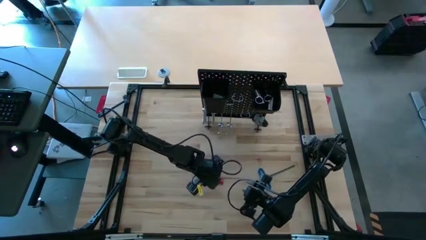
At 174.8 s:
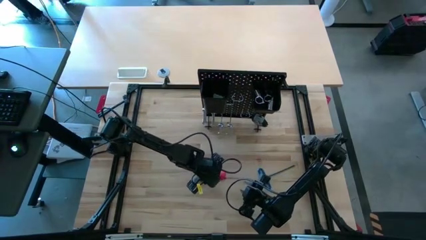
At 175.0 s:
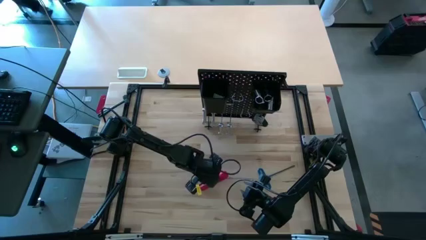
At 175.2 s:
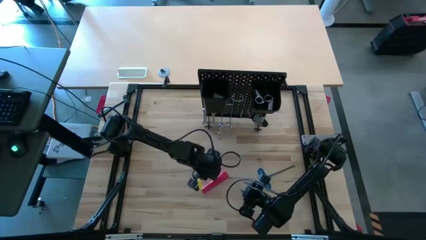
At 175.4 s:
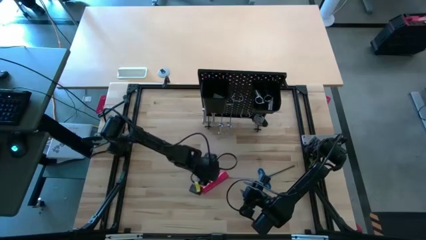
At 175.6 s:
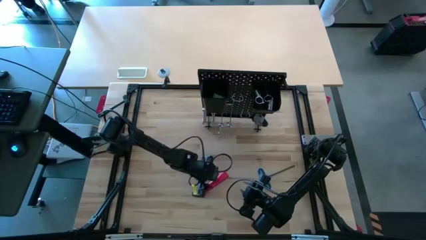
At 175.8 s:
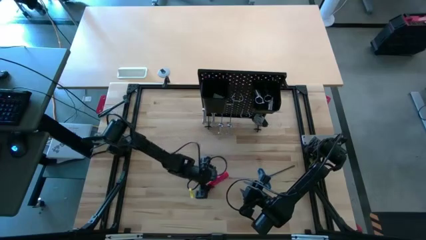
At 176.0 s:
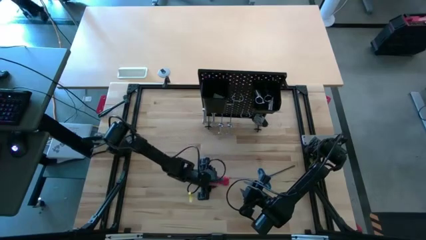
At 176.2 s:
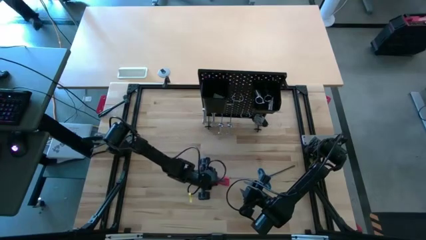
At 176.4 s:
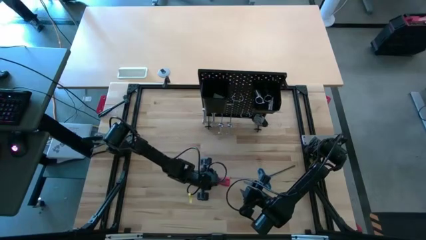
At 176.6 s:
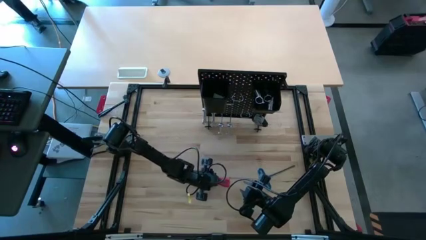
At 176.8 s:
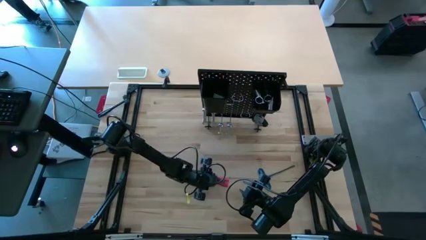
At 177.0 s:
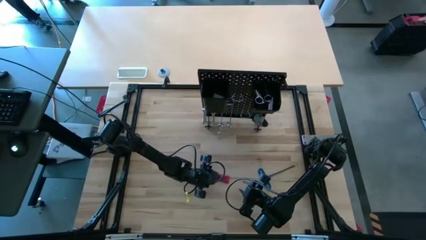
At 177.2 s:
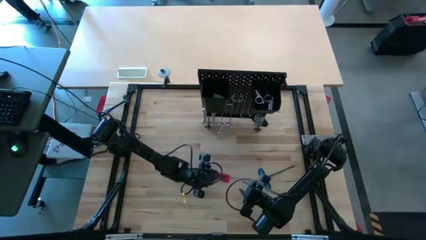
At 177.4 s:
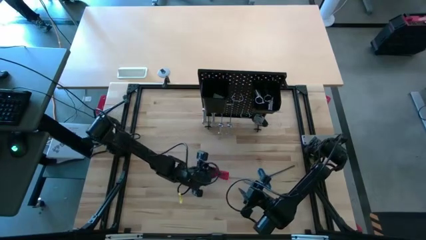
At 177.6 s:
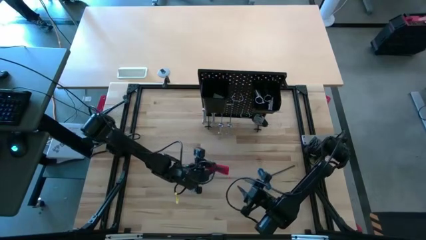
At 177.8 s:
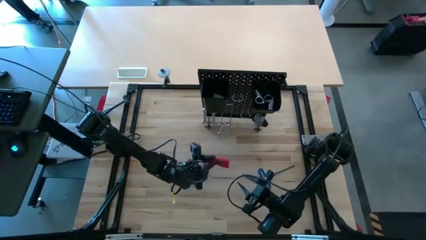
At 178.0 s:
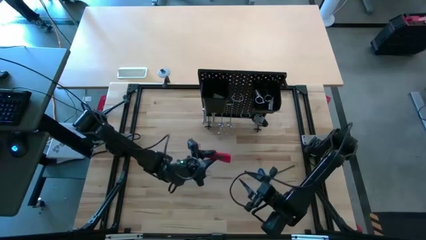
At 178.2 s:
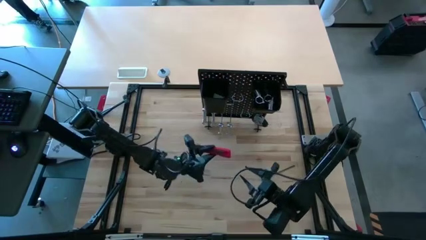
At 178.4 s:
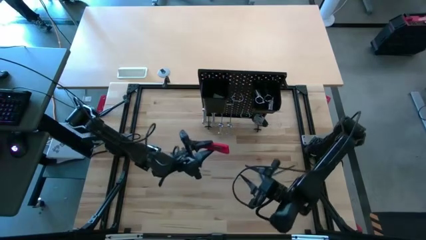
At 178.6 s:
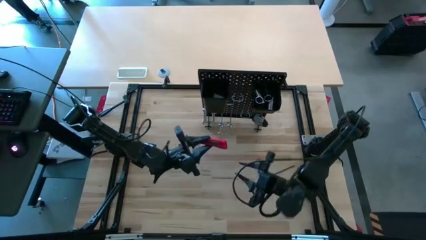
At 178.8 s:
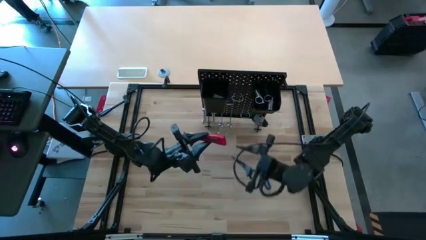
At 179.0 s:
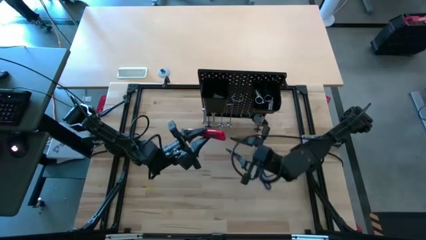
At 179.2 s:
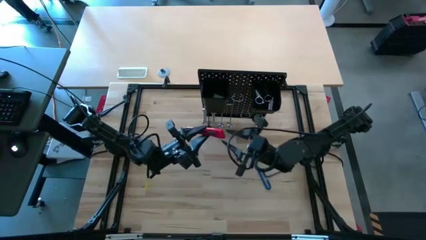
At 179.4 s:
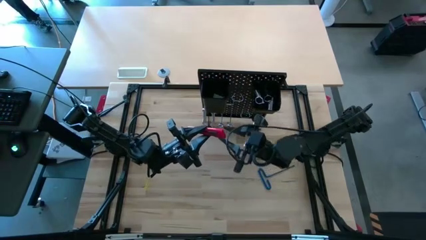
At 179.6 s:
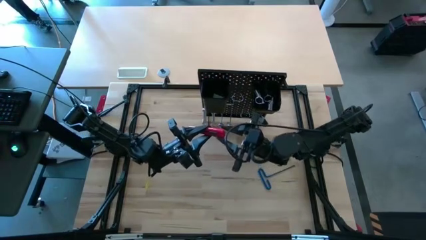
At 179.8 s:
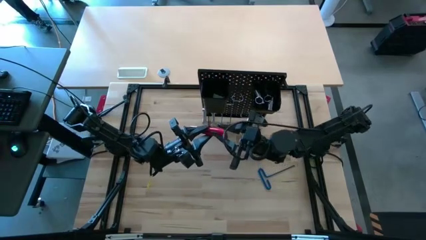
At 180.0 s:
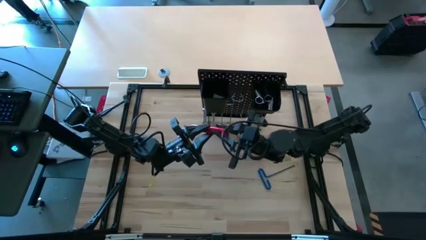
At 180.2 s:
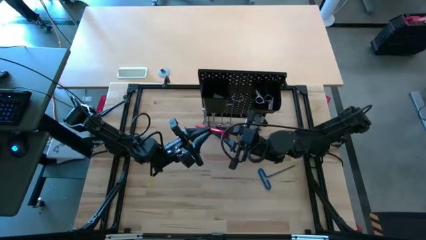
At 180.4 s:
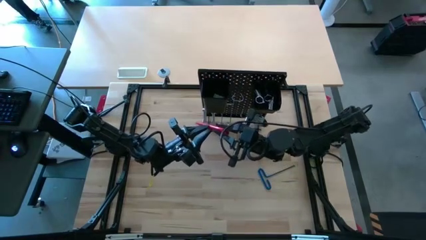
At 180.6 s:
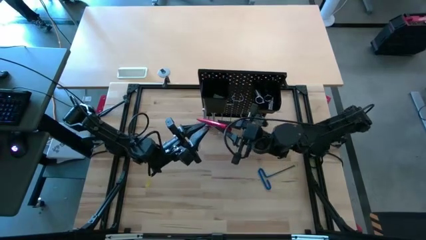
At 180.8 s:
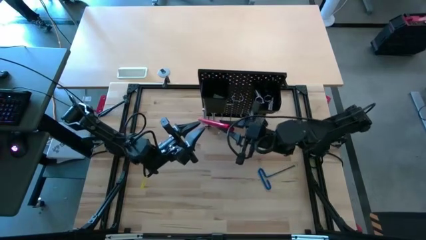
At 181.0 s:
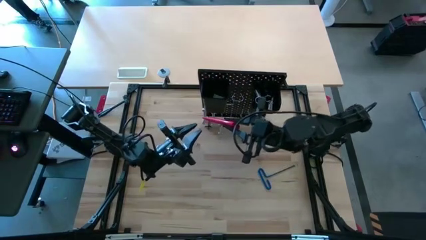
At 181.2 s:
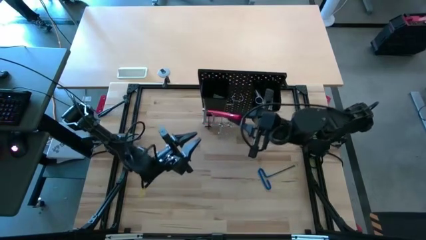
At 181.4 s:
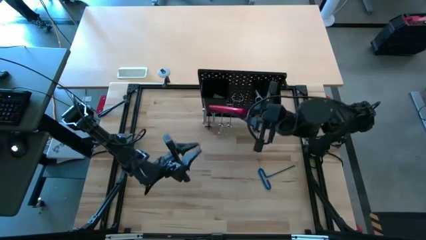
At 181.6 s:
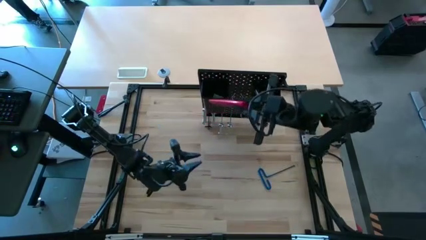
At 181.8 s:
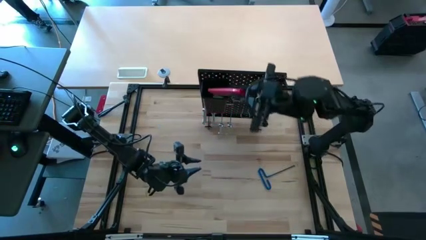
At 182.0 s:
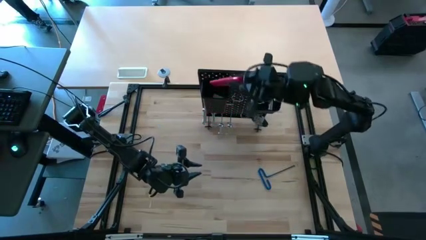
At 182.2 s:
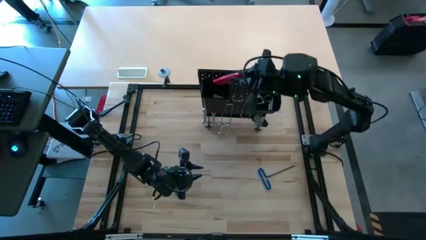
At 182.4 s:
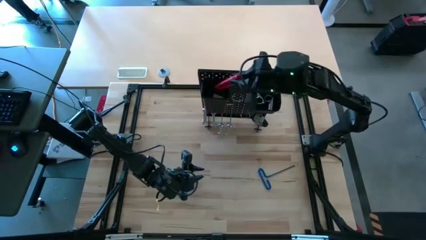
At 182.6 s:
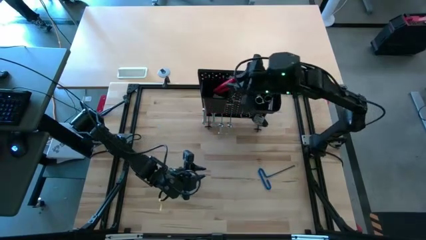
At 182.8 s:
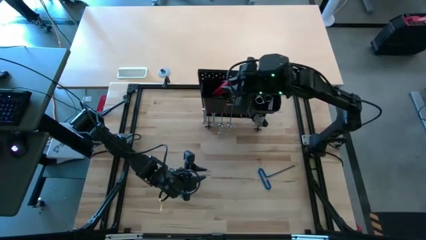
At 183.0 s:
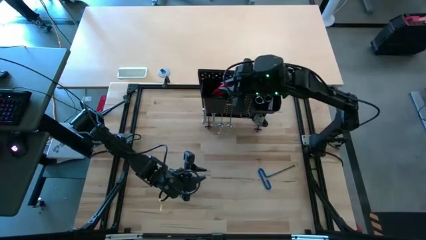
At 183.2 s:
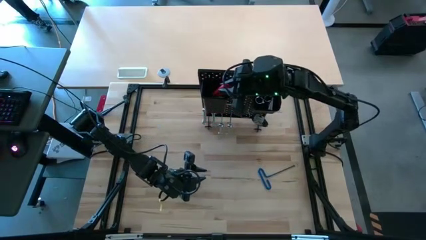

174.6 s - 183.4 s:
Task: Hang tools onto peg board
Put the cutter into the peg board

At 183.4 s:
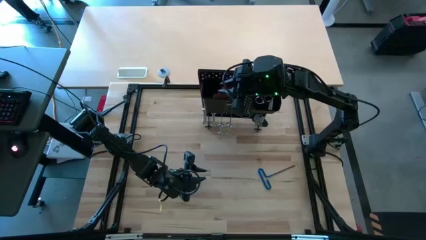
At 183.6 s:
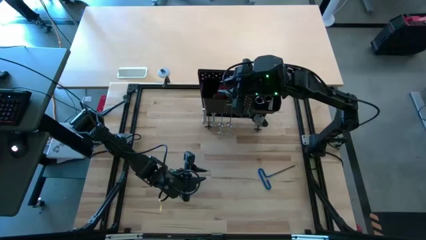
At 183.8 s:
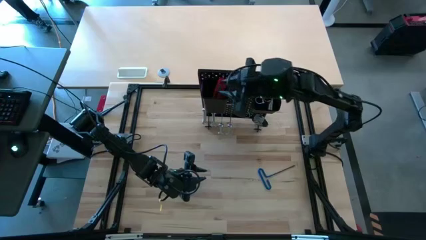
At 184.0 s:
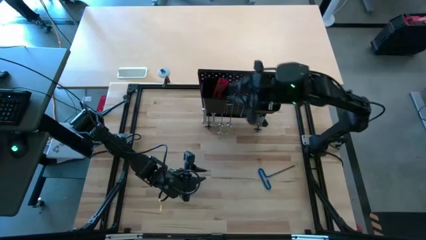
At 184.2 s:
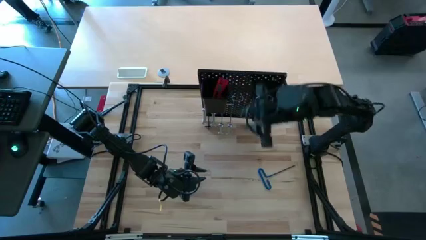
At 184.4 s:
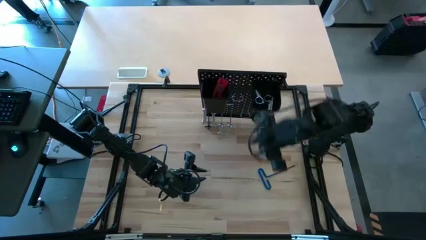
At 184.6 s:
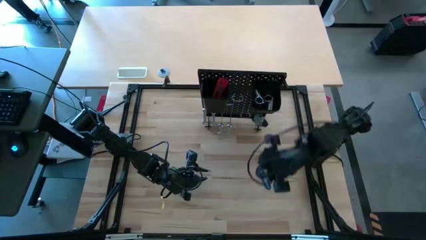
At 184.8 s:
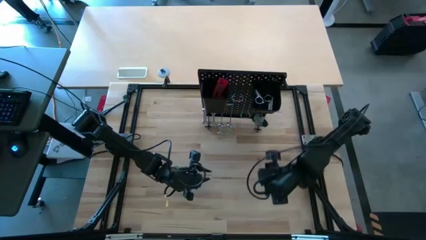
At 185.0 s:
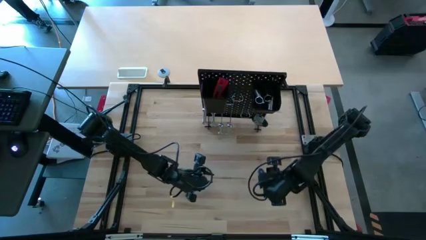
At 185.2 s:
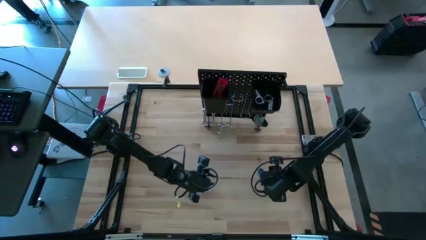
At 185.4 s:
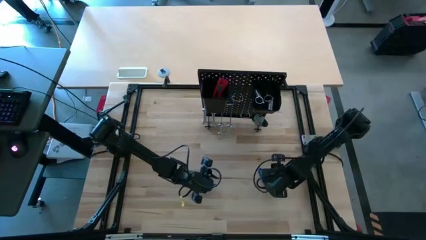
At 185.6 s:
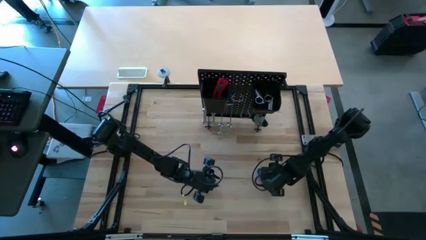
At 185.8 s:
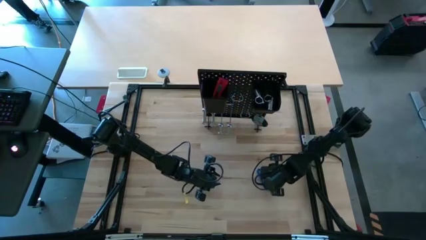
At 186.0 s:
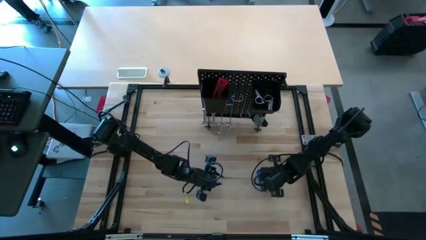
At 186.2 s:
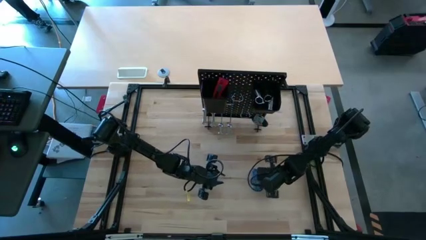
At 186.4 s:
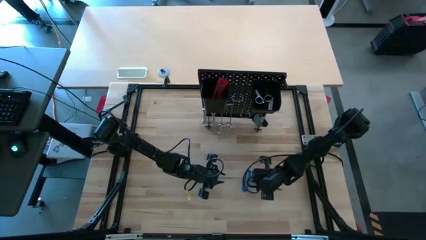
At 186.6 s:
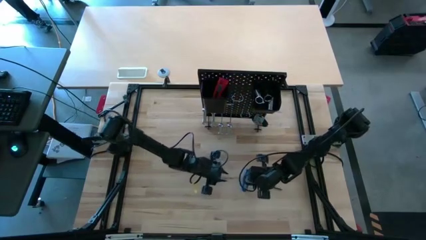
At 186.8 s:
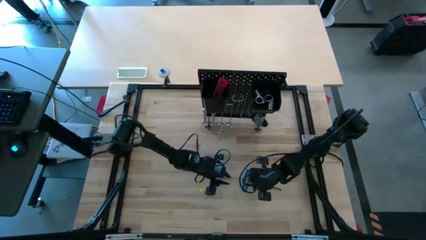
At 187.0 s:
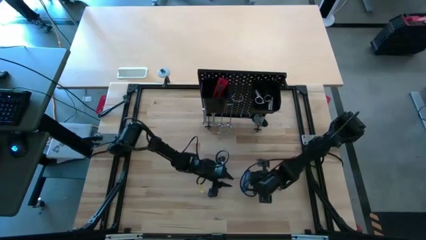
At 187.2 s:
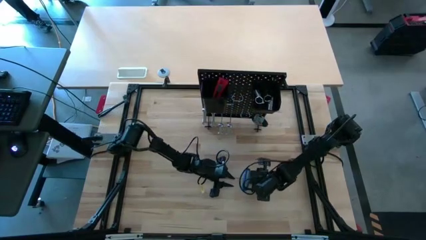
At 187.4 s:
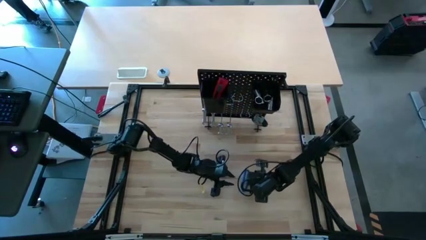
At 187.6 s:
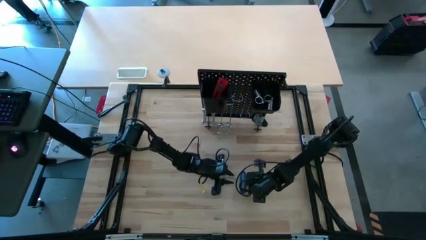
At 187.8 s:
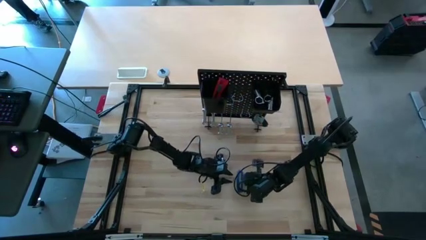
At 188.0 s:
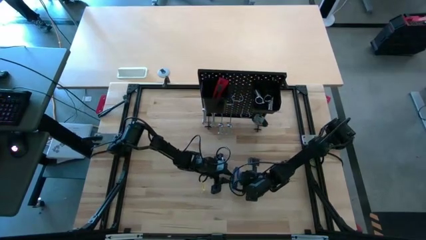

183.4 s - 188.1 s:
Put the pick tool into the peg board

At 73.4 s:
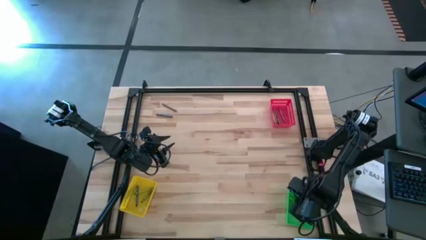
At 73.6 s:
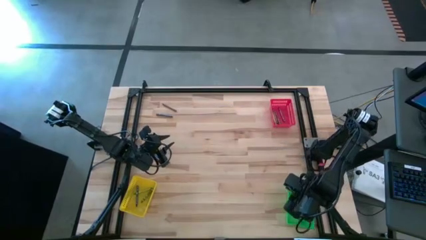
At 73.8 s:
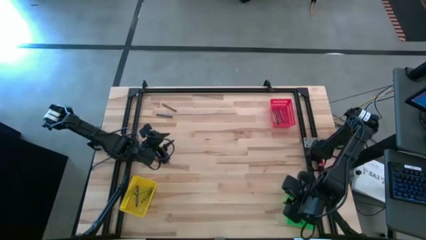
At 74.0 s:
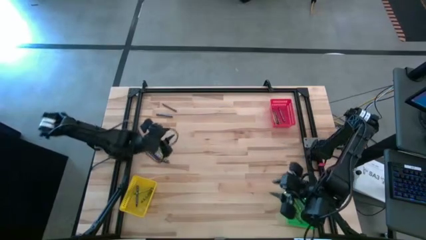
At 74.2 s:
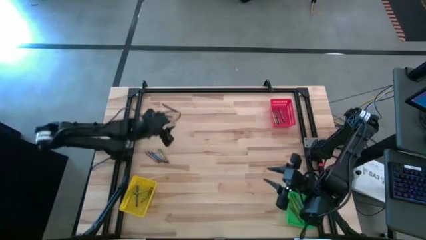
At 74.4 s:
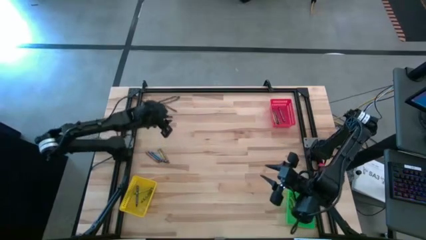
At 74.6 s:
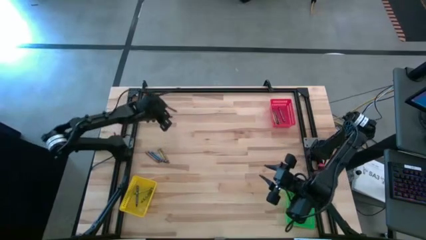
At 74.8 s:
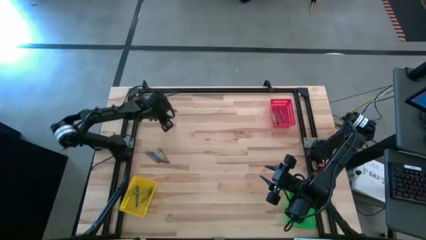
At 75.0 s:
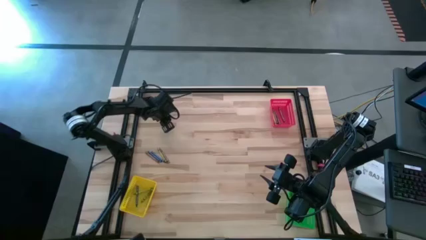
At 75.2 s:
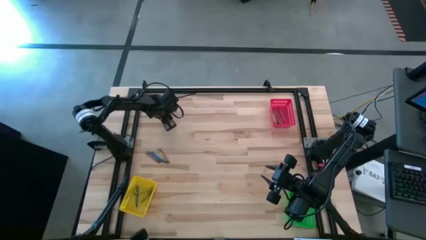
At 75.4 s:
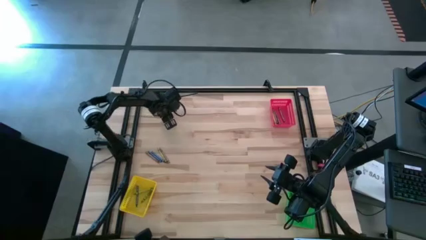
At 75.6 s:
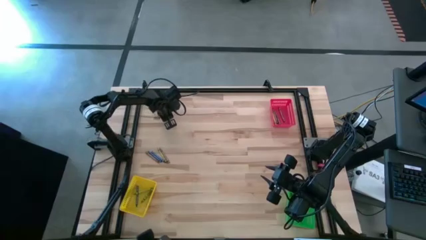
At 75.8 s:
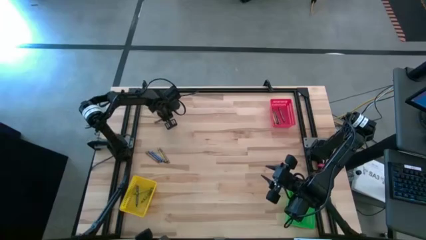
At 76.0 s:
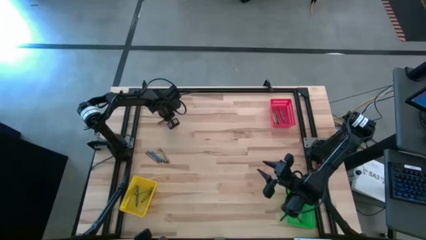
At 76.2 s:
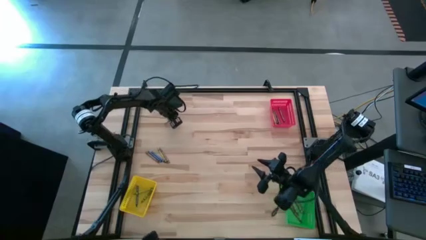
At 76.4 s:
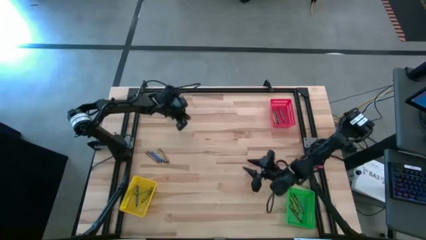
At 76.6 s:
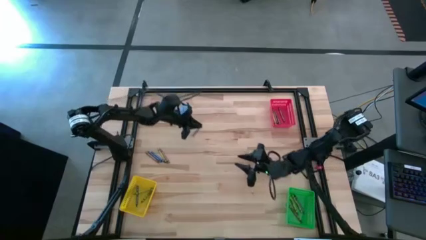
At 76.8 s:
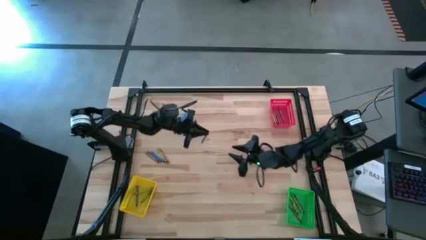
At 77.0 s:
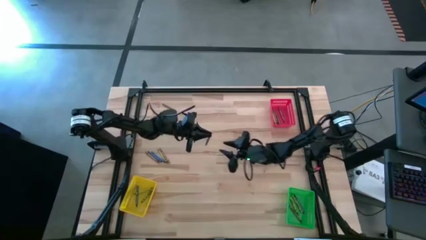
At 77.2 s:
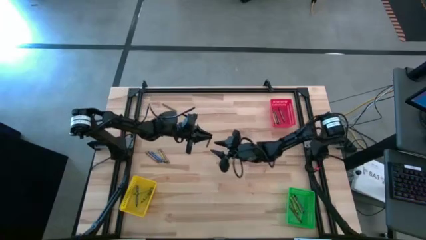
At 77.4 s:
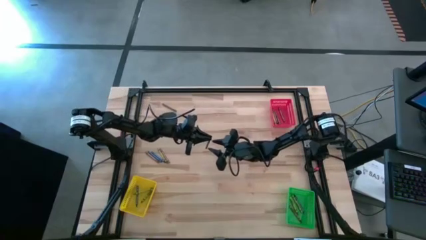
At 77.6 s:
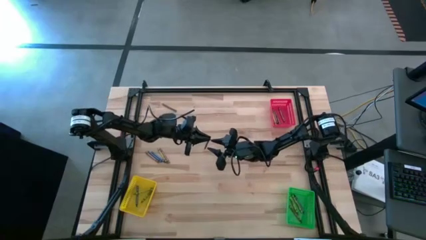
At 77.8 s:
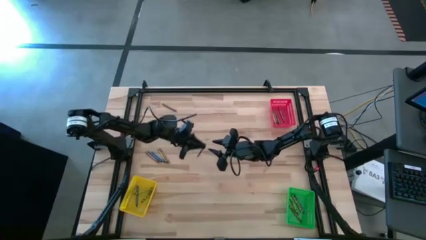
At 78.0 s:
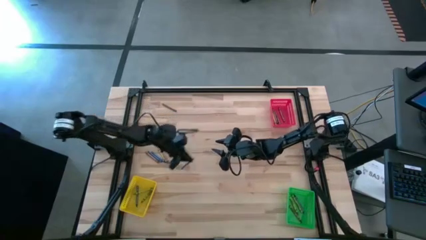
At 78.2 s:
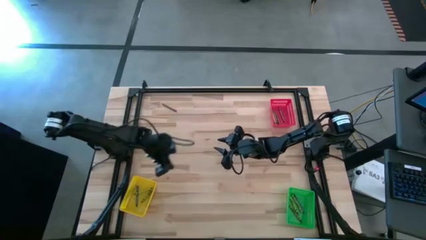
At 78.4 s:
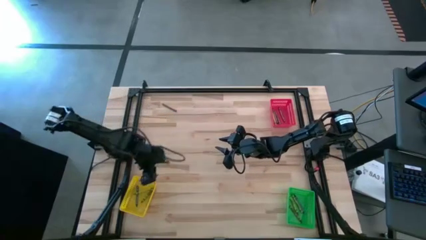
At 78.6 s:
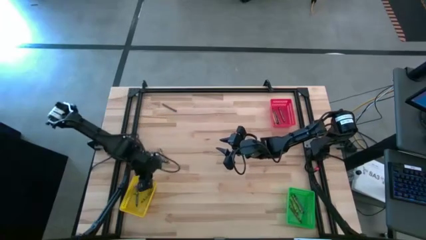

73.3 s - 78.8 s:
Task: Sort crayons
Put the blue crayon into the yellow bin
